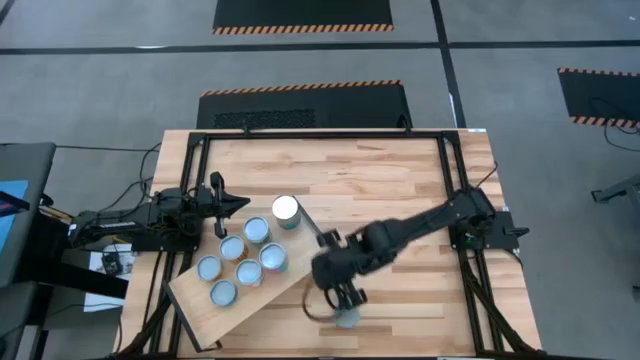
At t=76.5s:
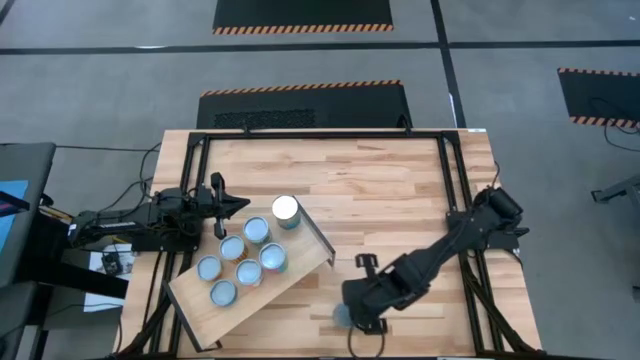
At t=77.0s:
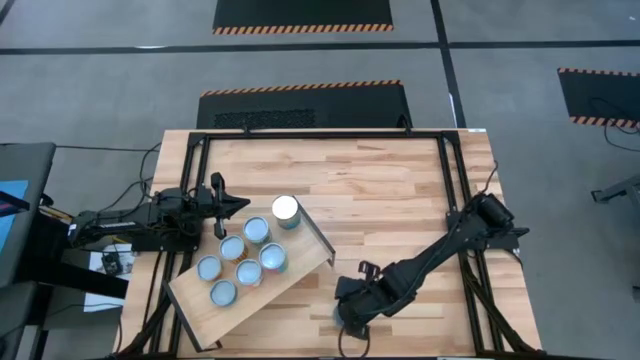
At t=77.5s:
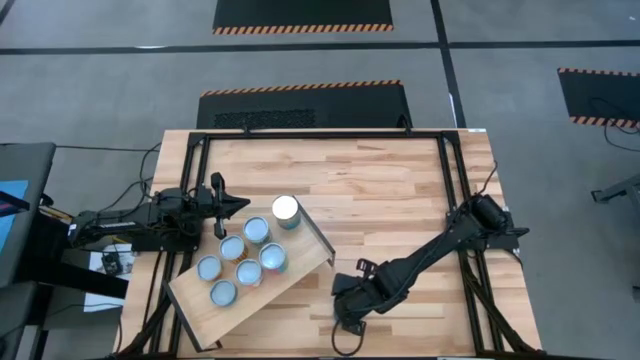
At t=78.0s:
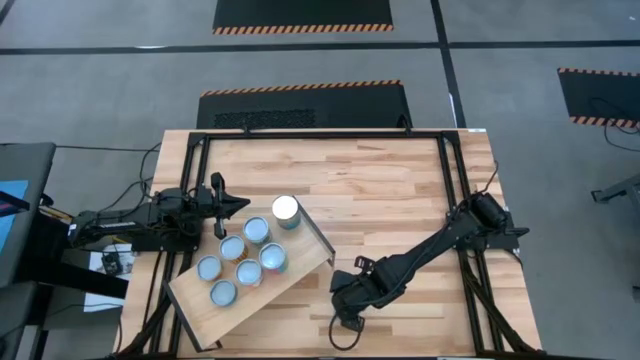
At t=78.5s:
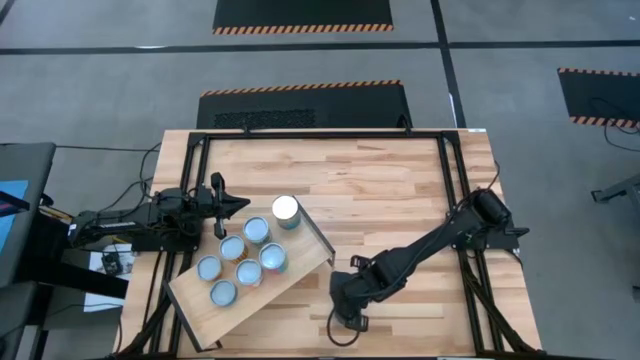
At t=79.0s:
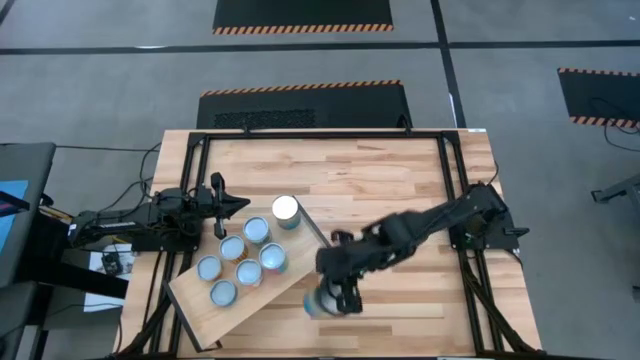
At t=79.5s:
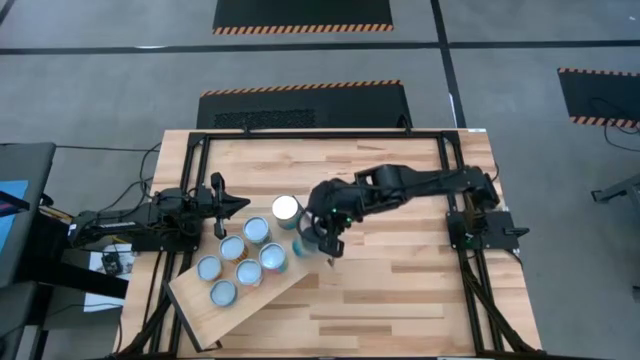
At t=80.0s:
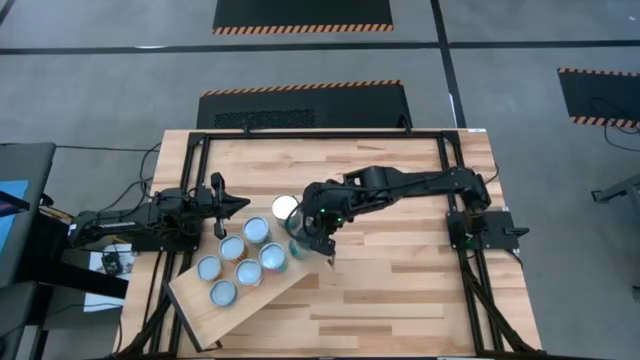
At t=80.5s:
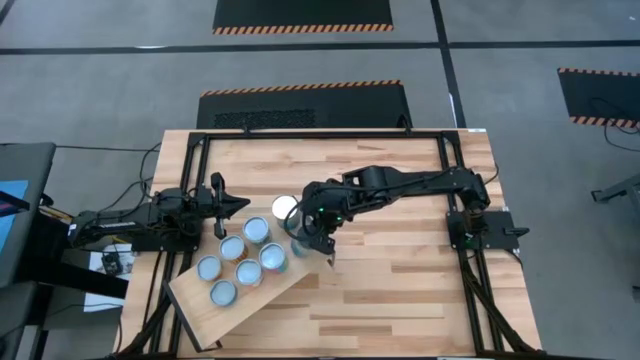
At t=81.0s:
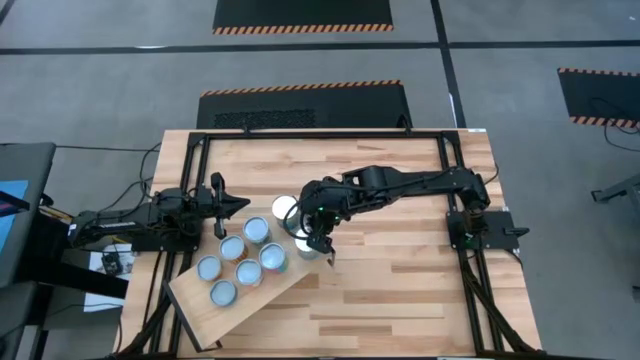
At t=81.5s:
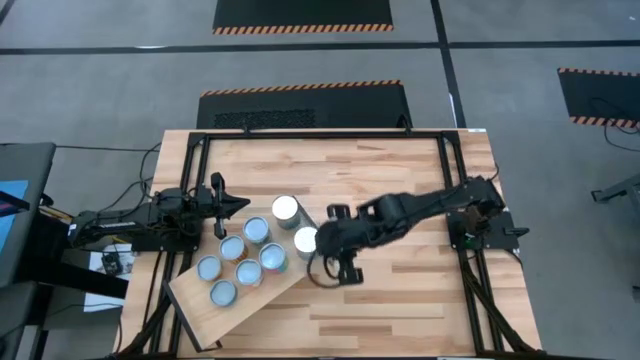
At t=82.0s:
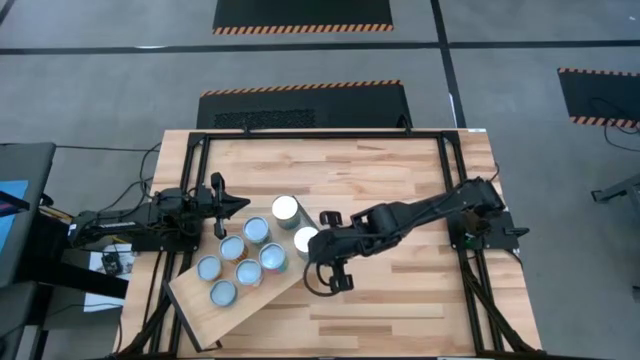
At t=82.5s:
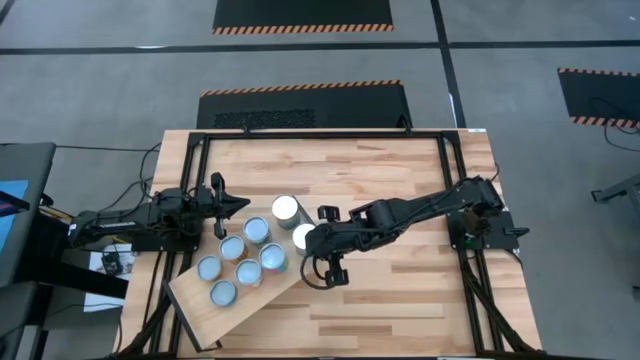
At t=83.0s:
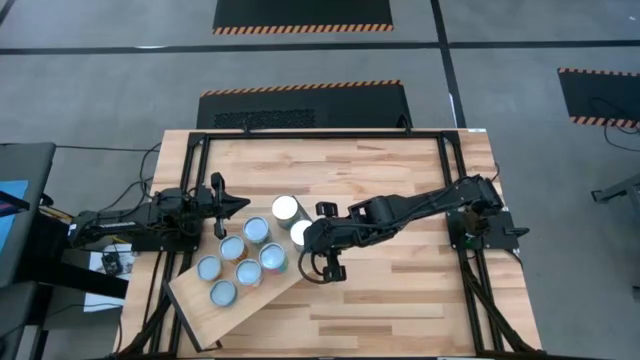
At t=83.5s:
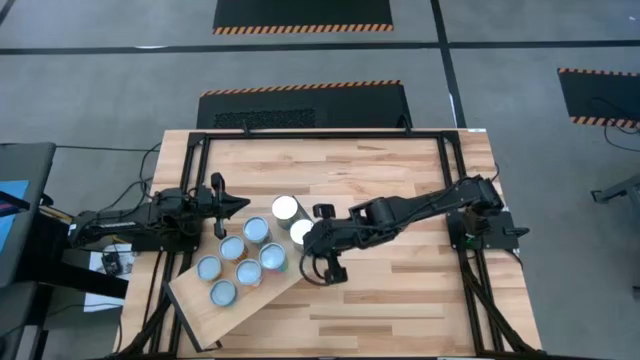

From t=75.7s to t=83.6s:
Task: Pick and place cans onto a shelf
Put the canned cherries on the shelf aligned with the other canned cherries

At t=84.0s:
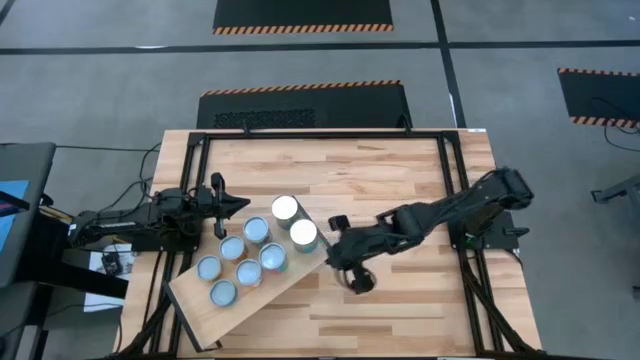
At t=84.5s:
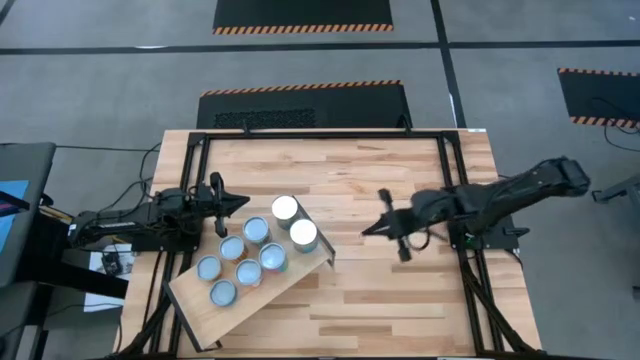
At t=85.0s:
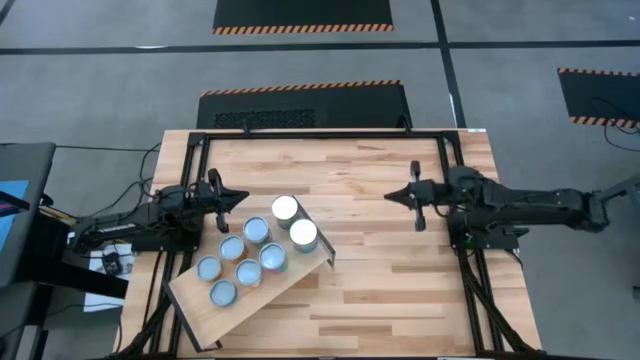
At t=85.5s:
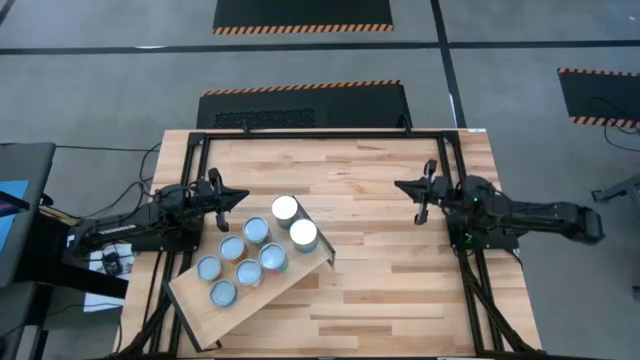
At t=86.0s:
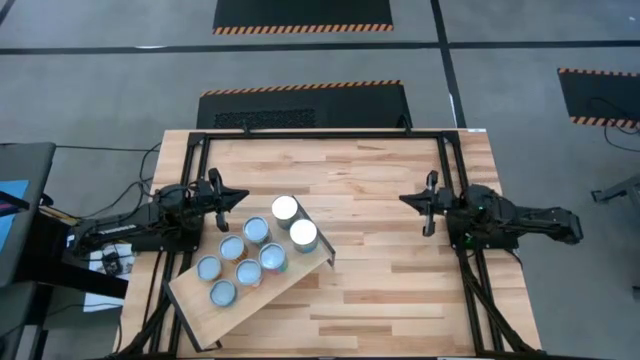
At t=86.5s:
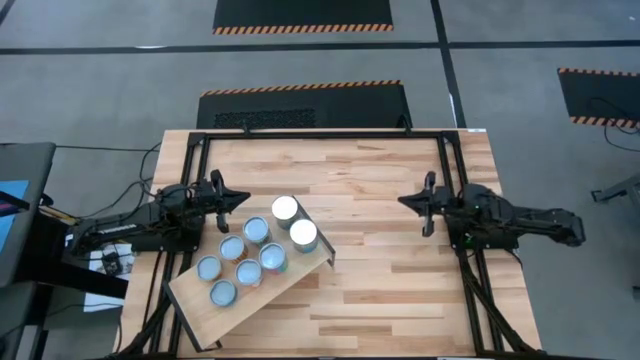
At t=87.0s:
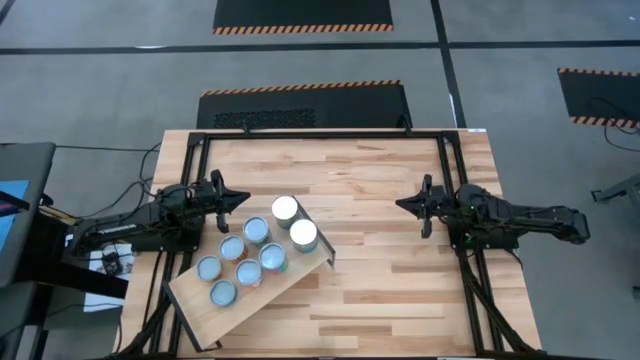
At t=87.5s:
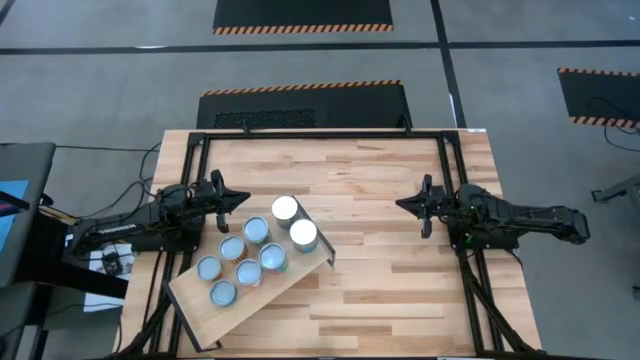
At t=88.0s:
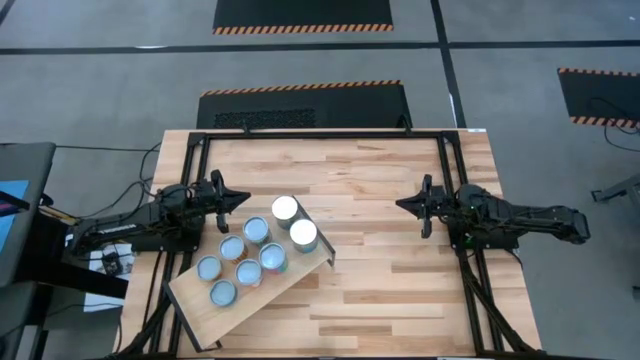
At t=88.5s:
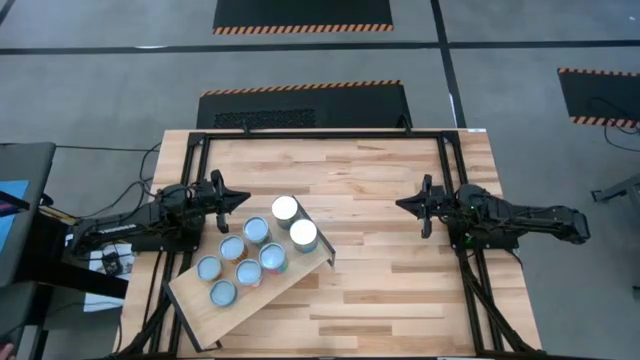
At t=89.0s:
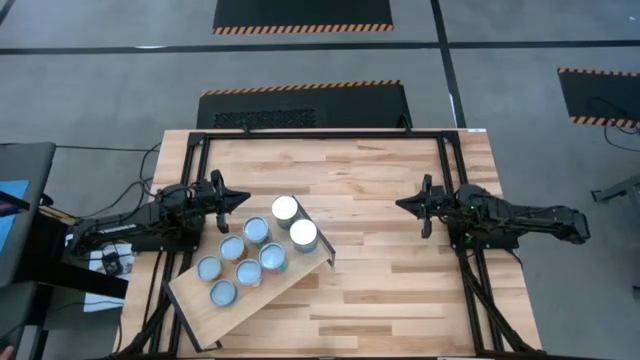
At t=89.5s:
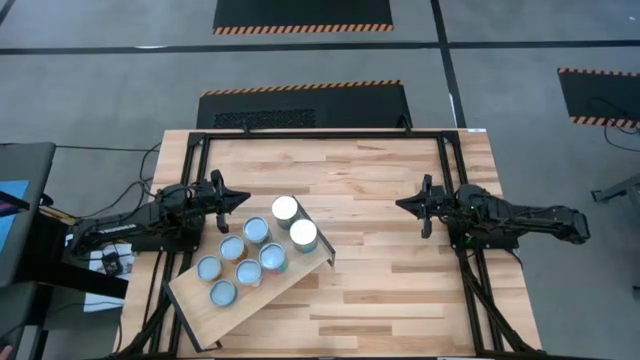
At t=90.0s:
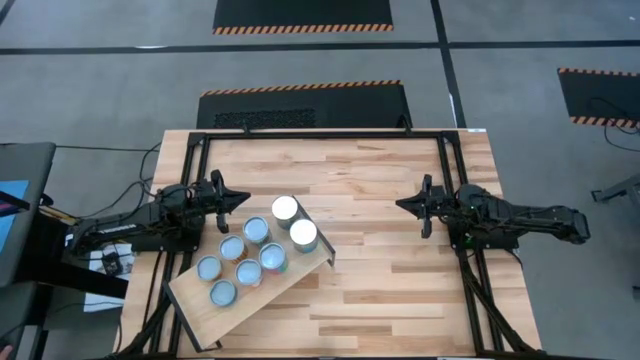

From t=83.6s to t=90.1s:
Return to Home Position

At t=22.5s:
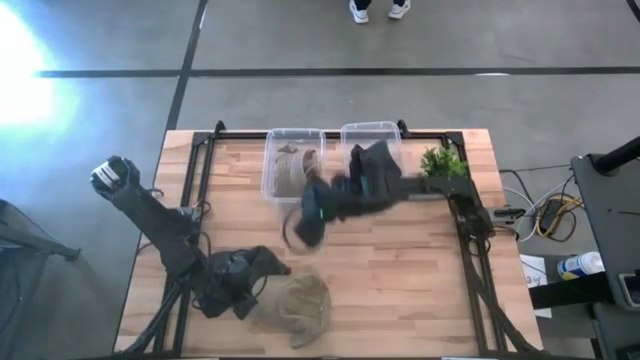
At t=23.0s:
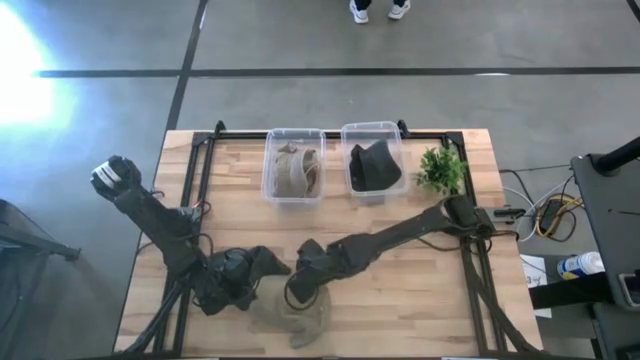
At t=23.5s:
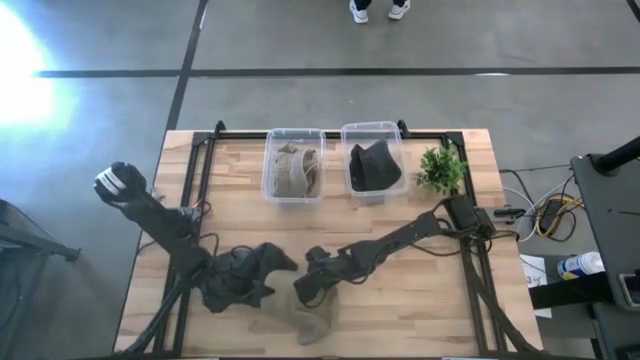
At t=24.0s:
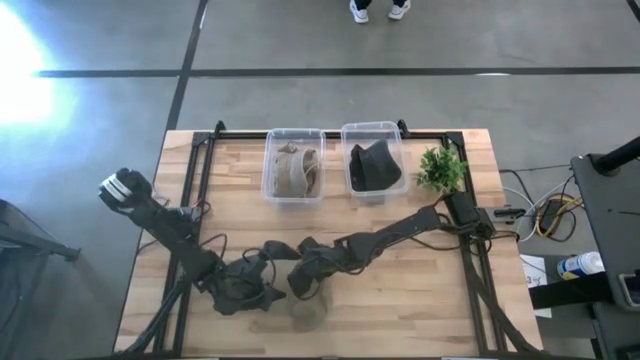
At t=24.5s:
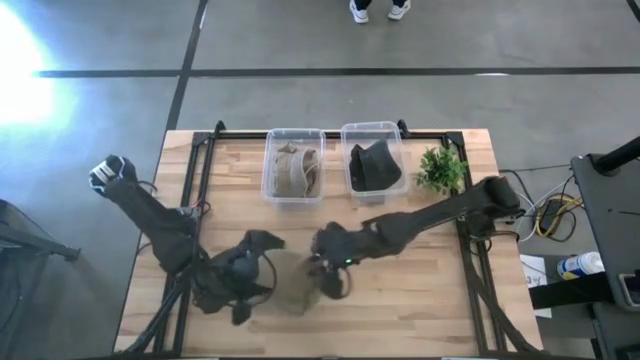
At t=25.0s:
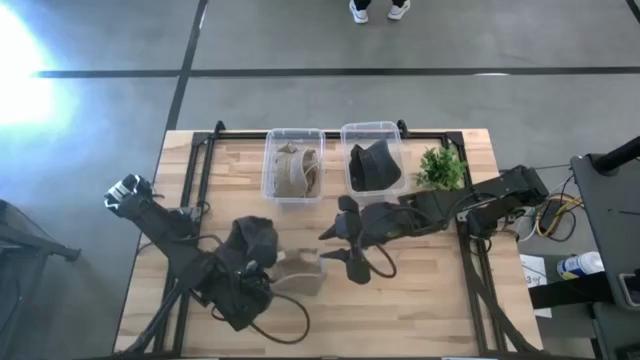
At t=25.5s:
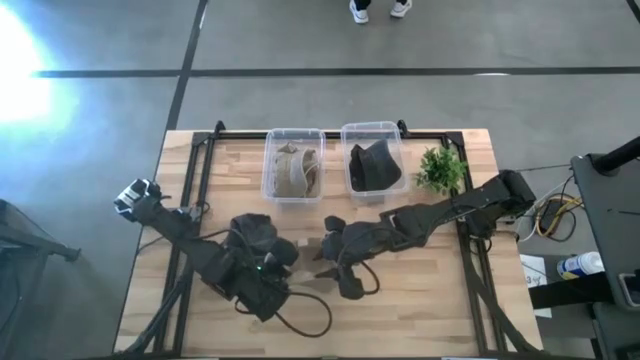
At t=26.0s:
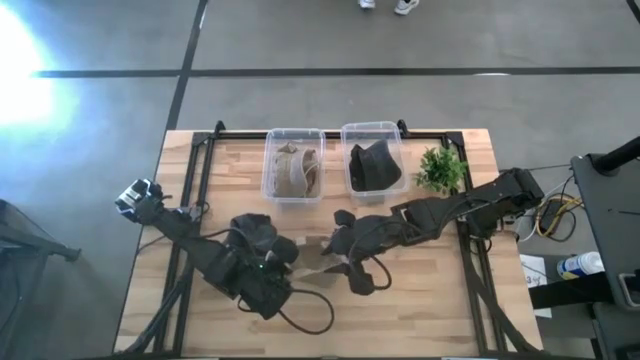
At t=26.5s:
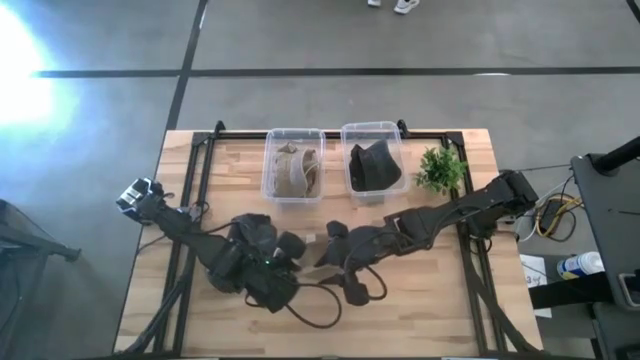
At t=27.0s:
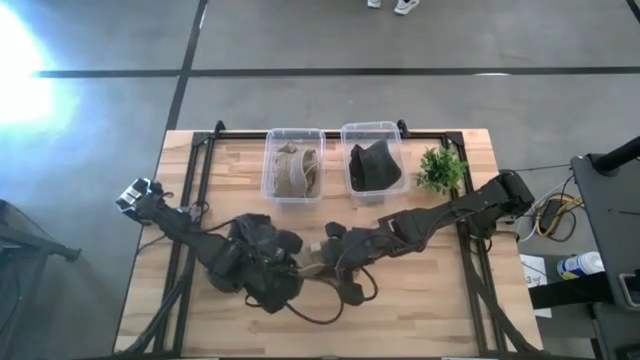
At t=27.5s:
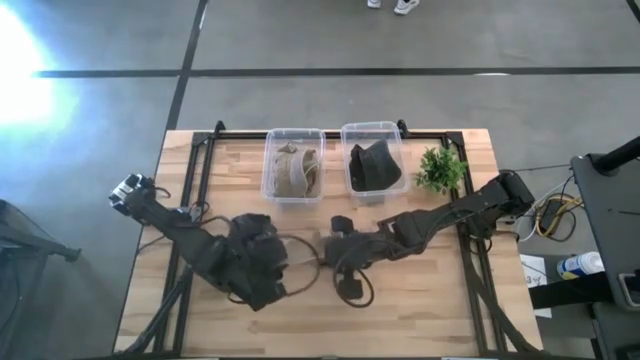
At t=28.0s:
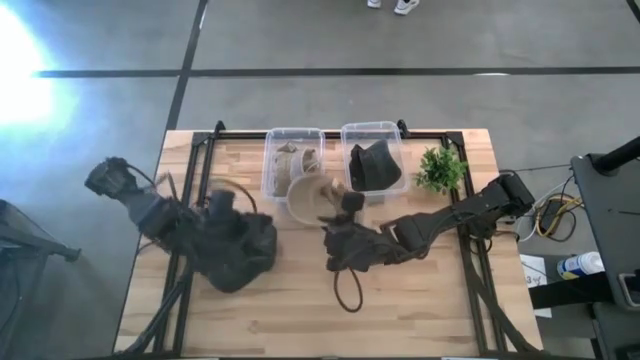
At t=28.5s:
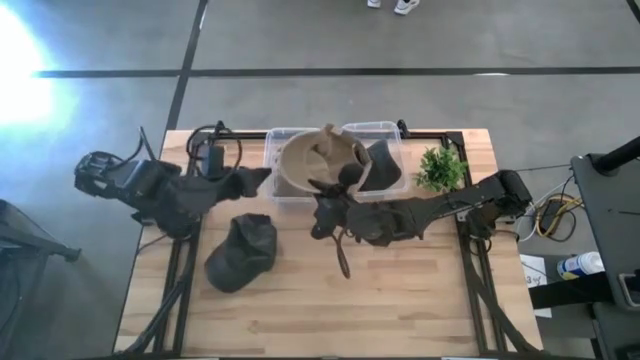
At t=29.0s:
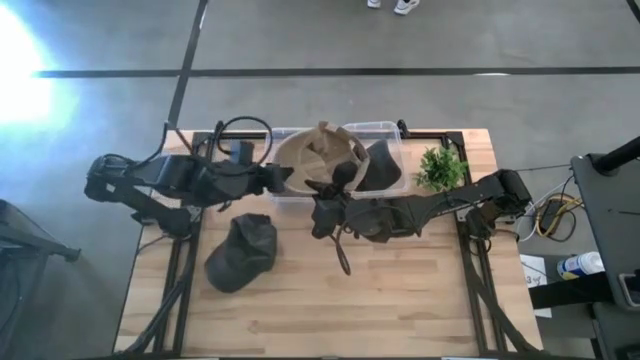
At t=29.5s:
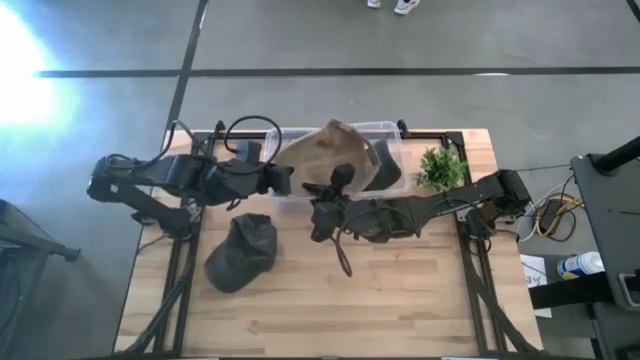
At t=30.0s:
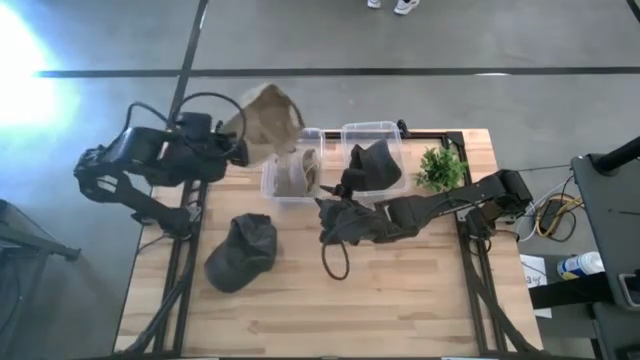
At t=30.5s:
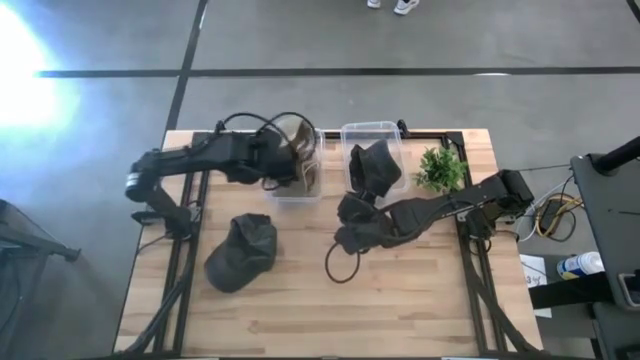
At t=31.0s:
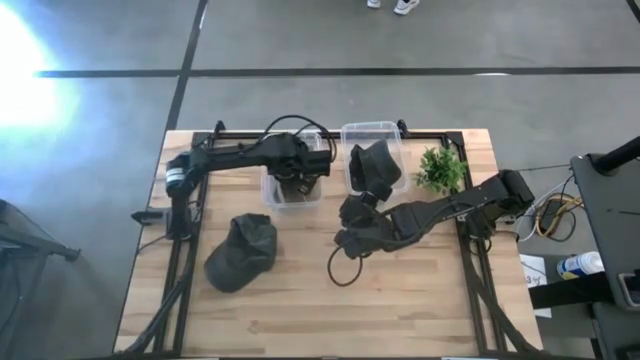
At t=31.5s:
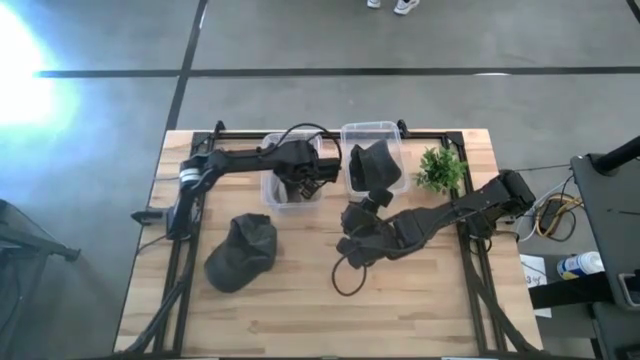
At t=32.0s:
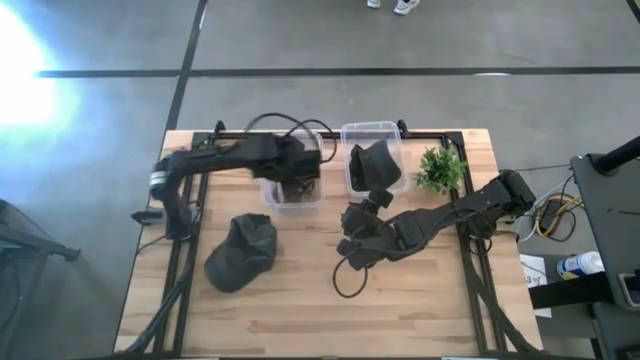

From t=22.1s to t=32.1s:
Task: Pick & Place hat
Put the brown cap into the left transparent bin
